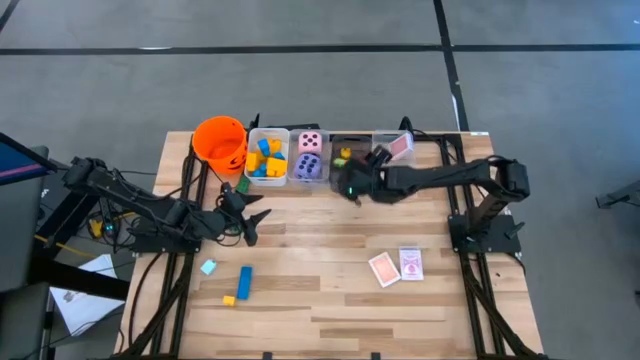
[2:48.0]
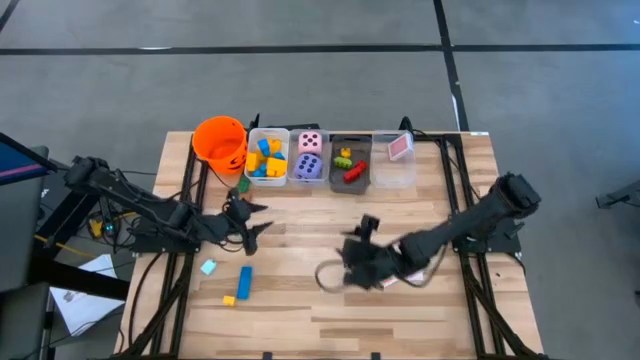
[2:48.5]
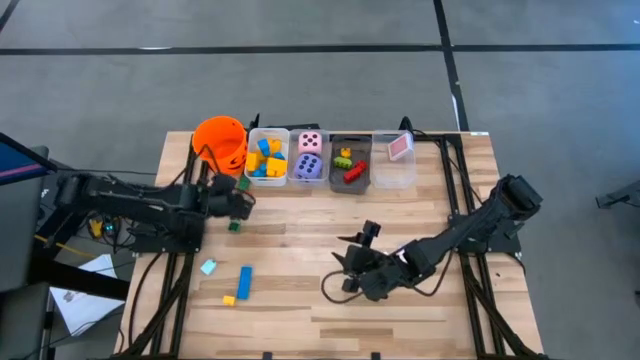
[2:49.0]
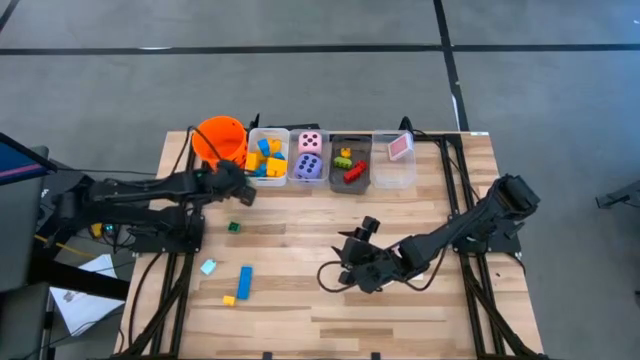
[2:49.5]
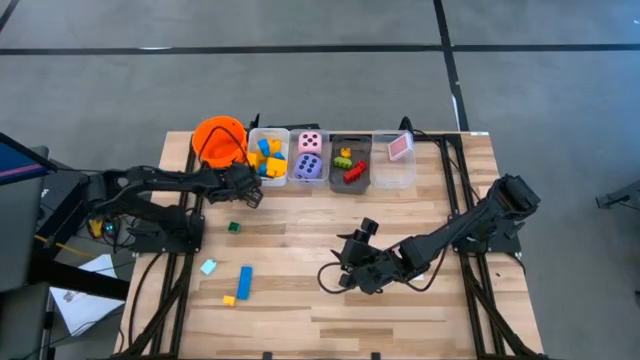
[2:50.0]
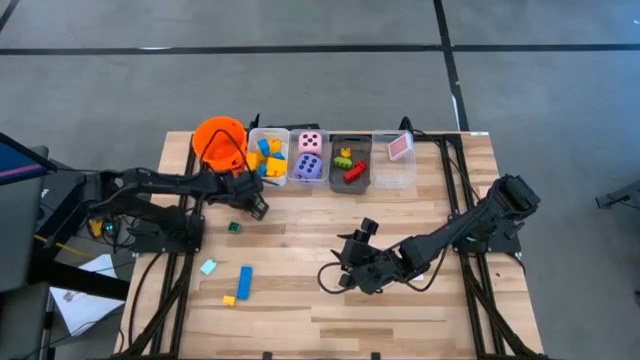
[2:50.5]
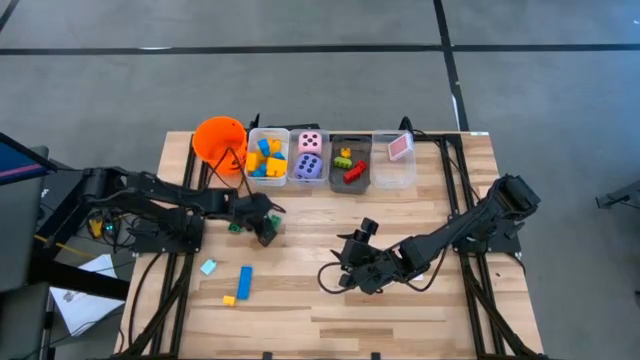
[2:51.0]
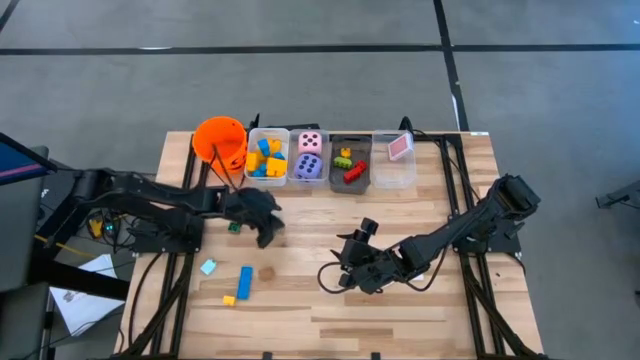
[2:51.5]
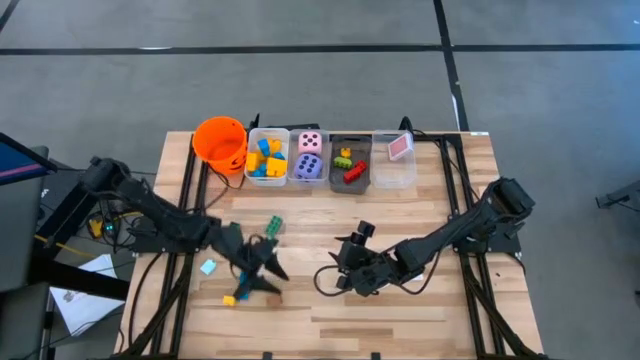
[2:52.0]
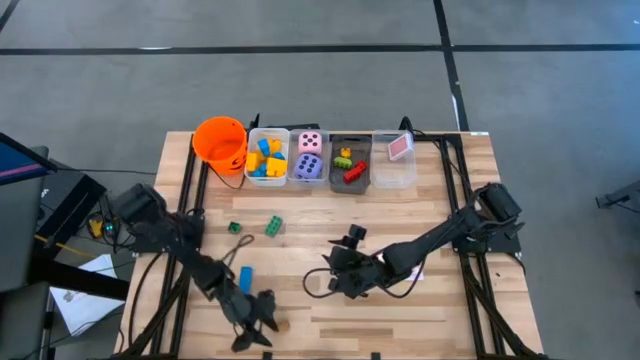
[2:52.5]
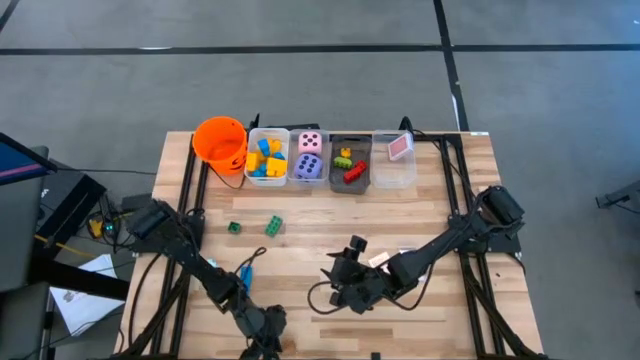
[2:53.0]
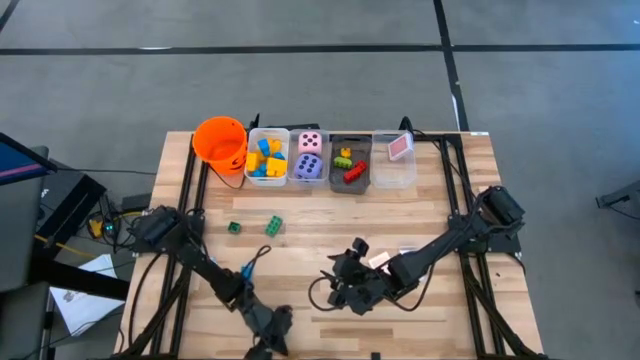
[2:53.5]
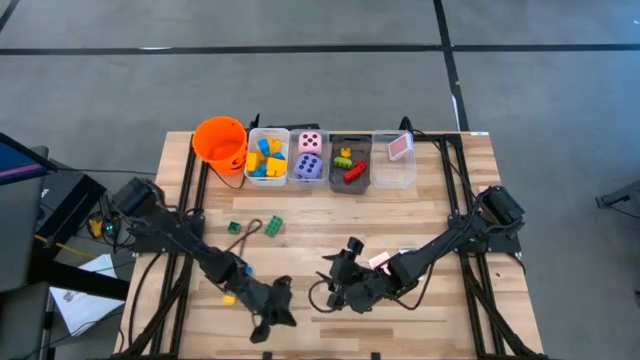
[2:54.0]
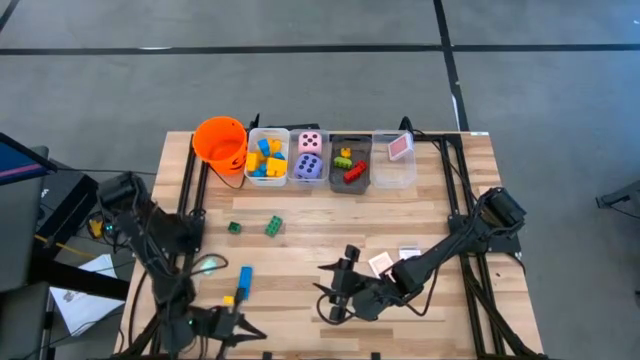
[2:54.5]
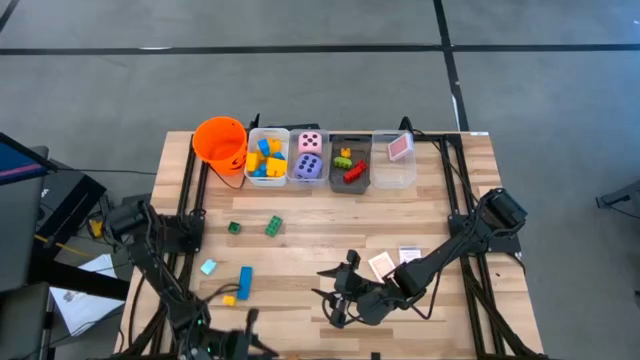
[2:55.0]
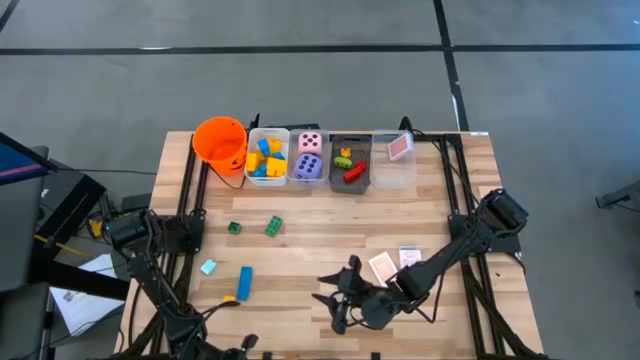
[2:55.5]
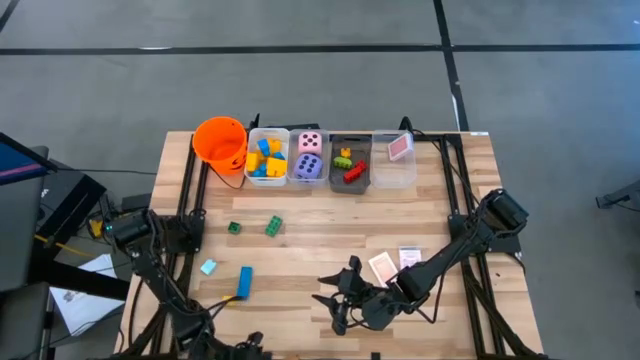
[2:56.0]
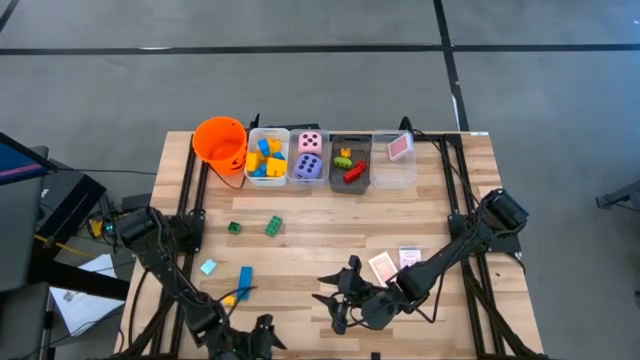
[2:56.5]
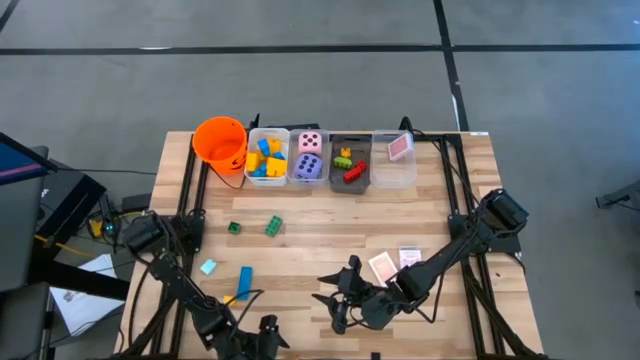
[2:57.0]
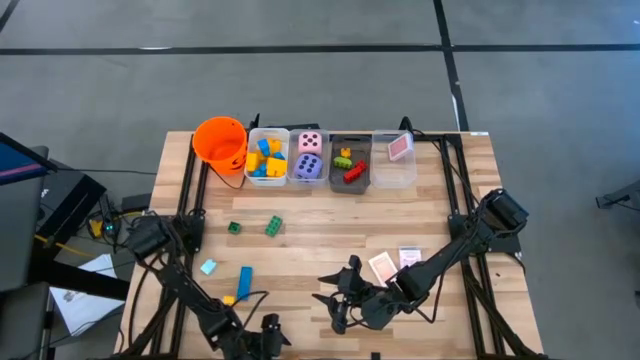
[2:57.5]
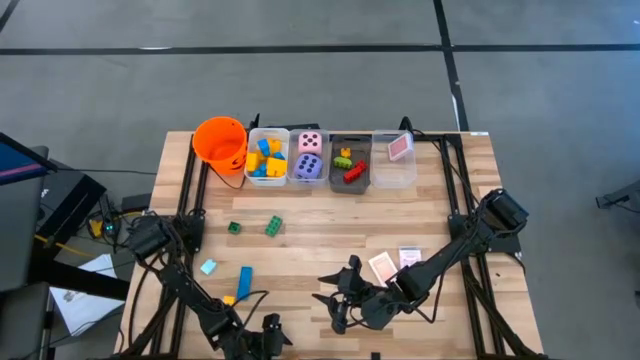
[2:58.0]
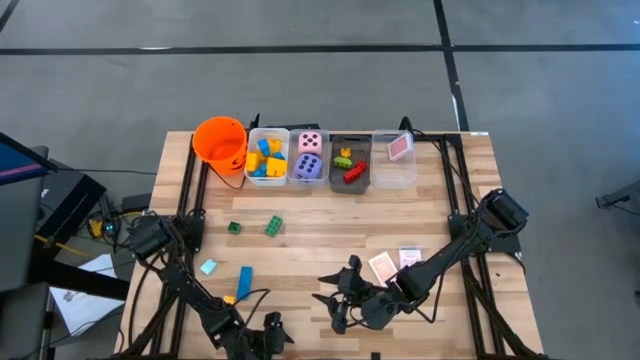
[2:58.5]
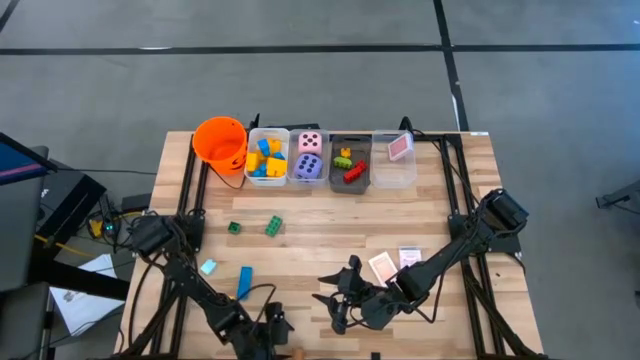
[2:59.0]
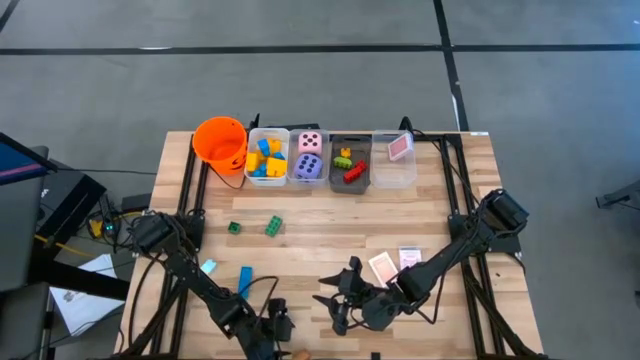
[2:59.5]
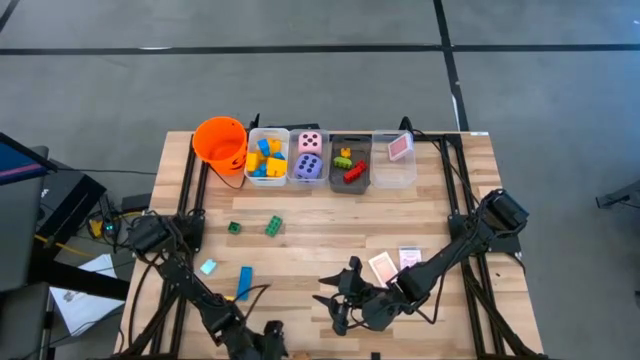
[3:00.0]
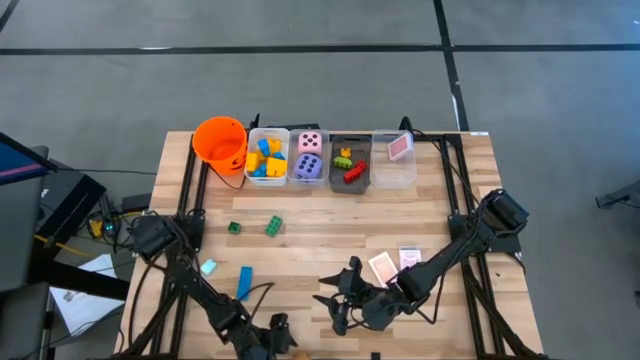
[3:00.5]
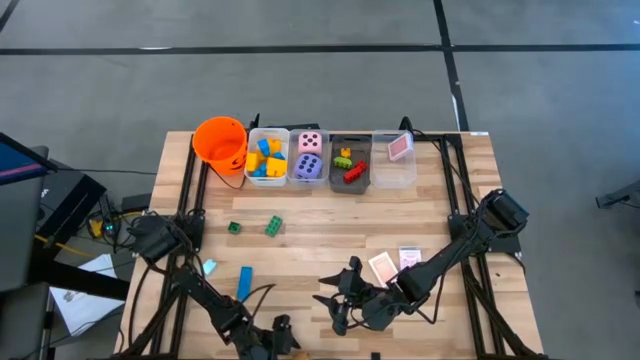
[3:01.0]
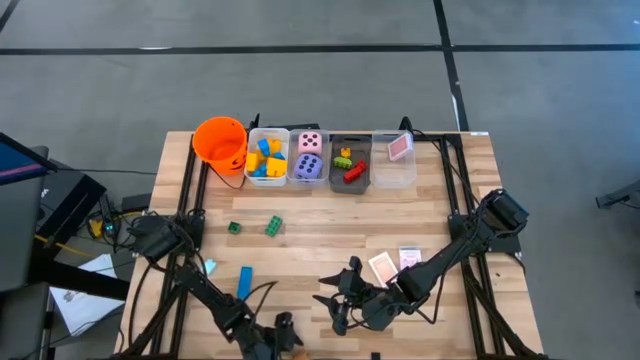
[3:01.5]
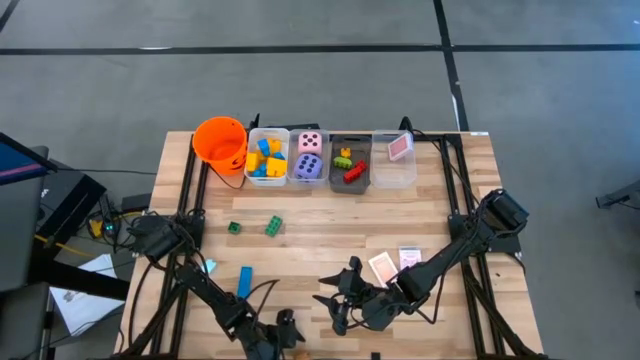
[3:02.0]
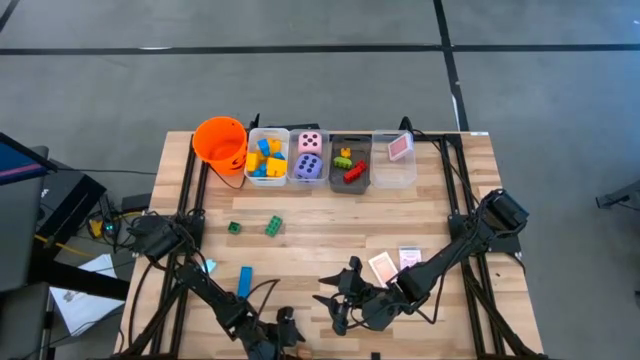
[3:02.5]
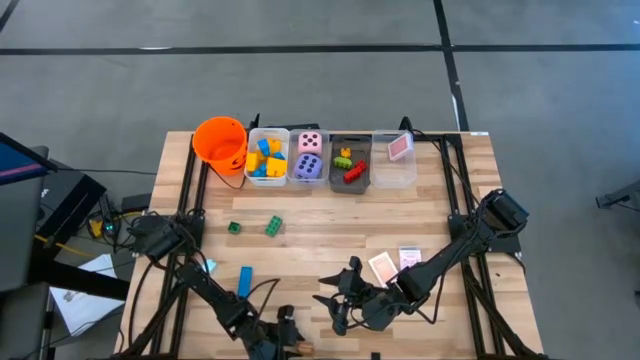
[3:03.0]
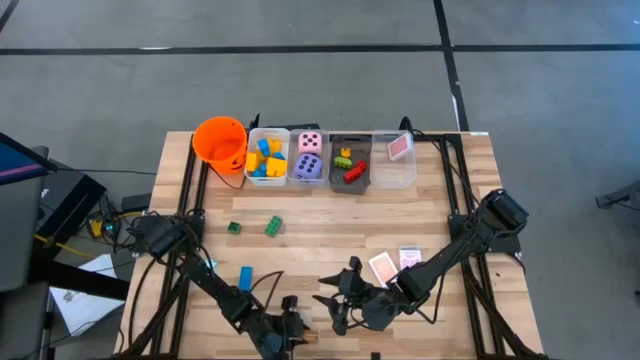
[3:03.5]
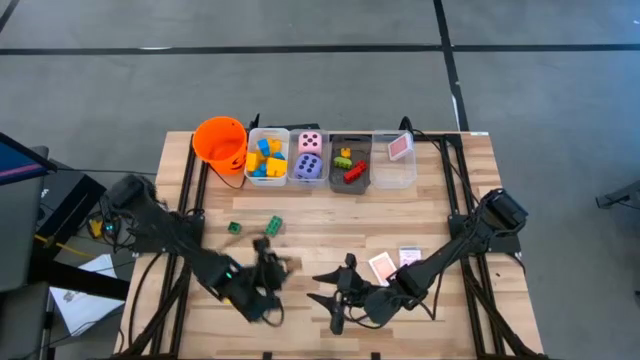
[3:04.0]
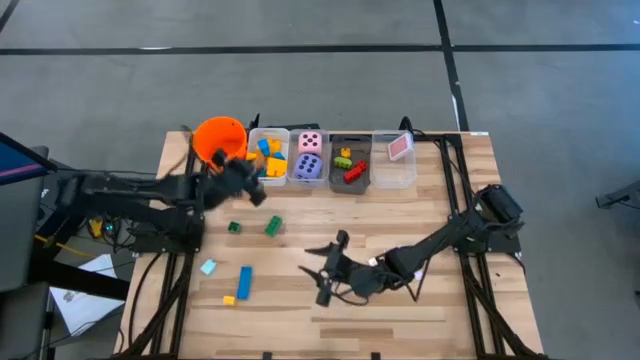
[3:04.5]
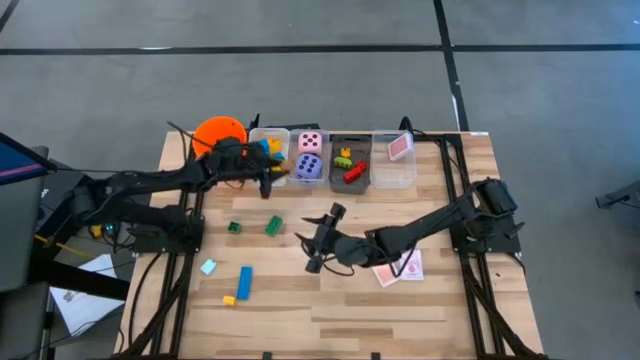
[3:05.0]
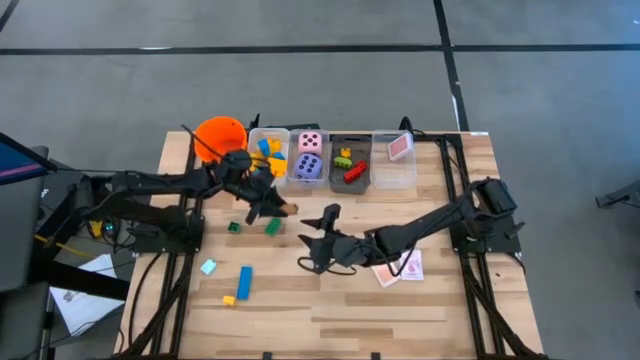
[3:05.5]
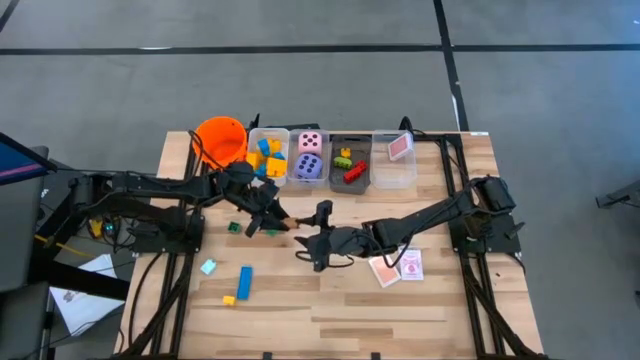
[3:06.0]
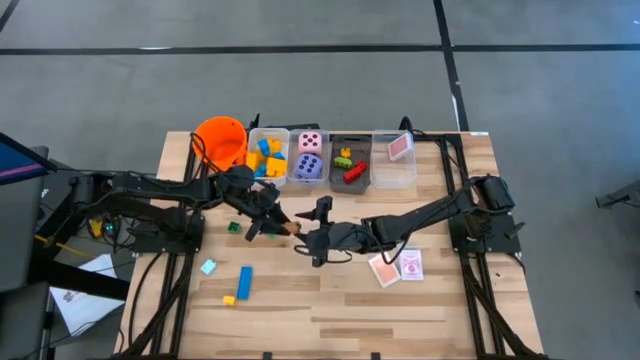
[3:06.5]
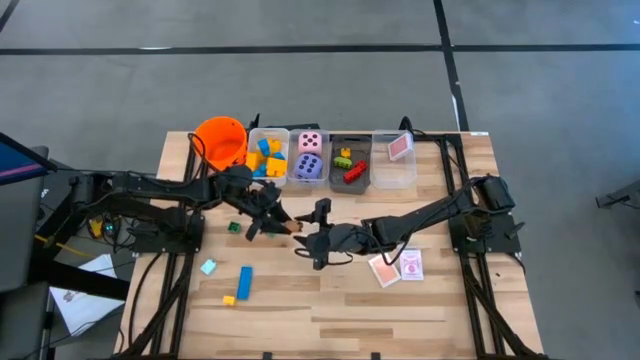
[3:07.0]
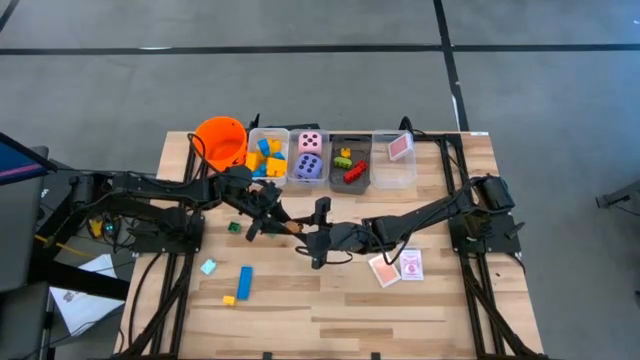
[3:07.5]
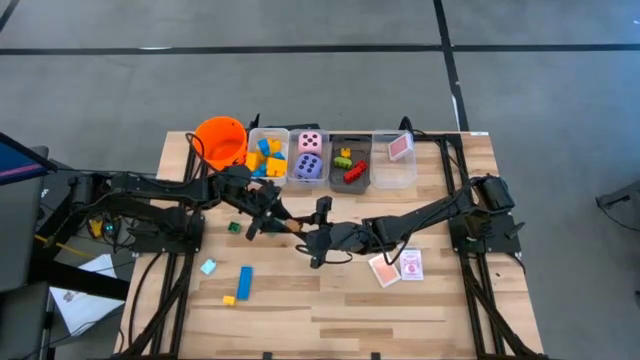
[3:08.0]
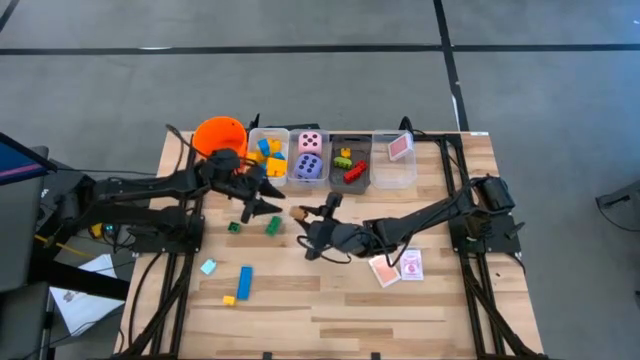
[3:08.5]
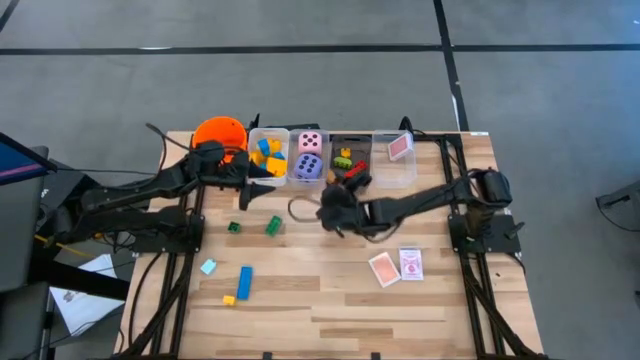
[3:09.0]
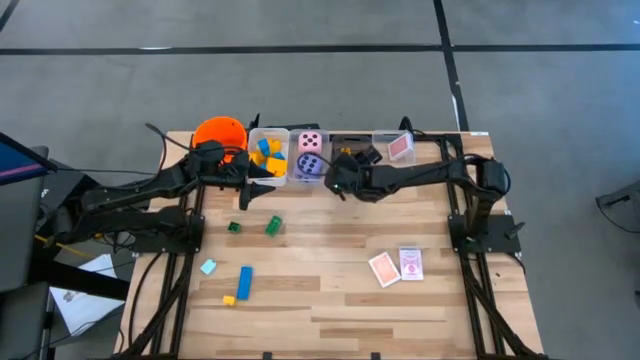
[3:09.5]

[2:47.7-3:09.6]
Task: Pick & Place Toys
Put the brown game piece into the black bin
